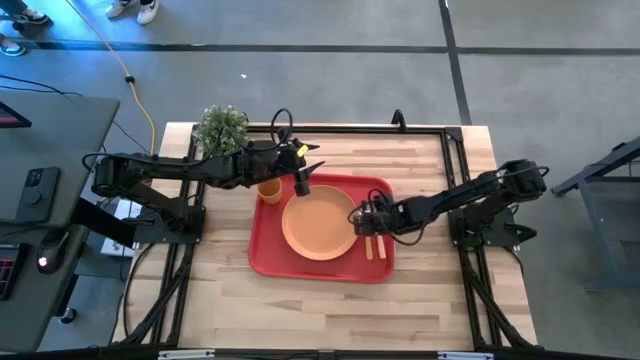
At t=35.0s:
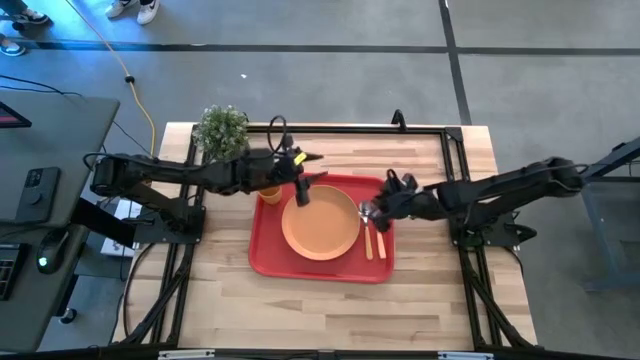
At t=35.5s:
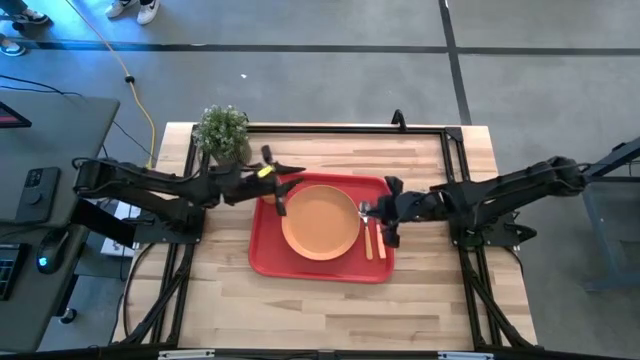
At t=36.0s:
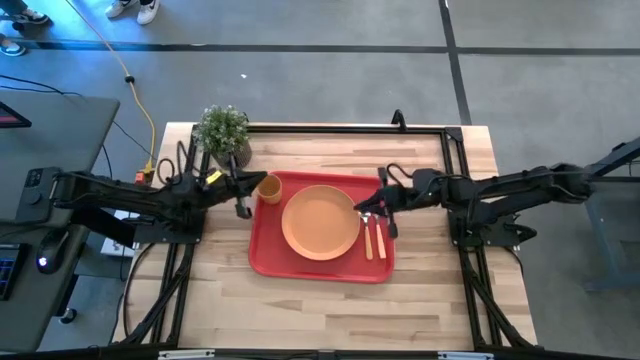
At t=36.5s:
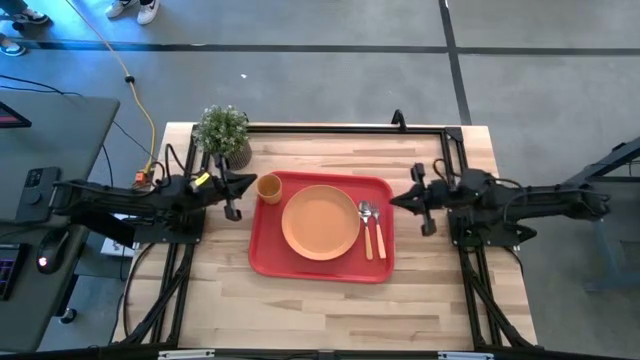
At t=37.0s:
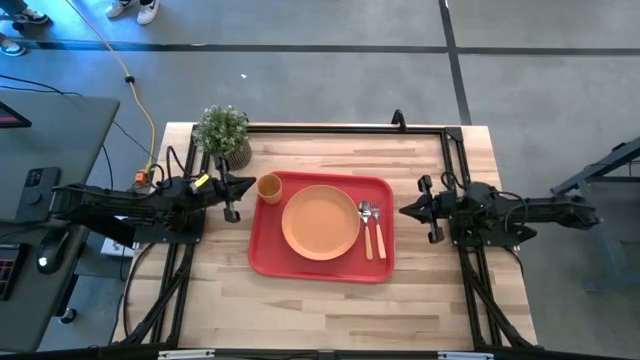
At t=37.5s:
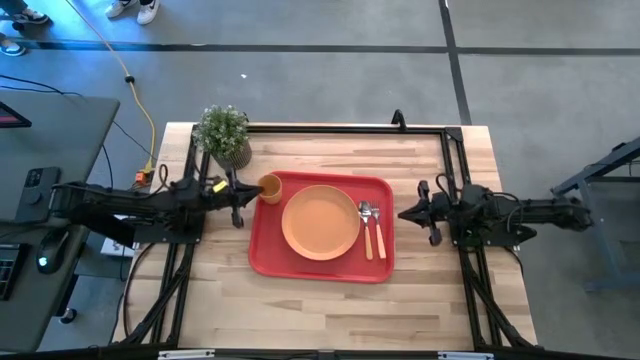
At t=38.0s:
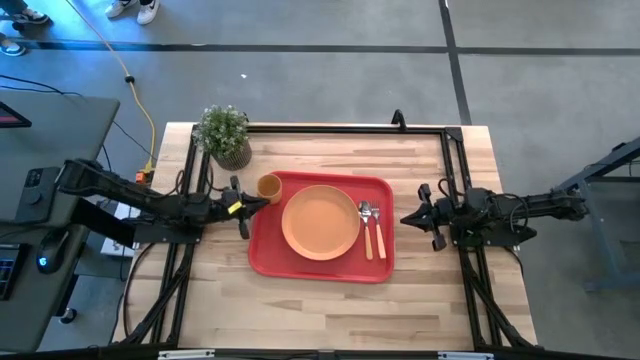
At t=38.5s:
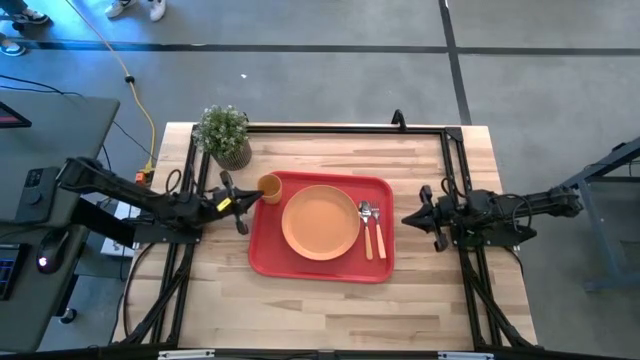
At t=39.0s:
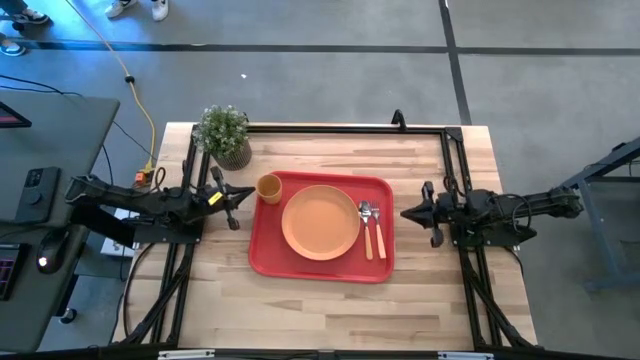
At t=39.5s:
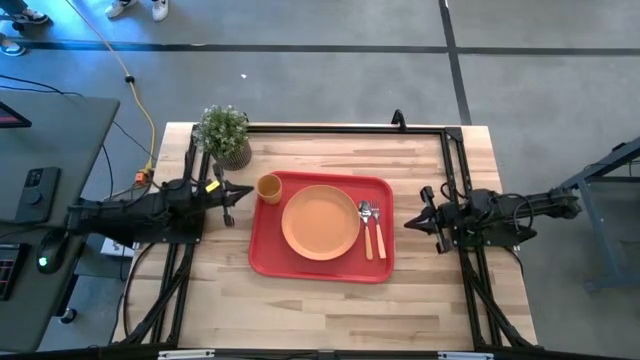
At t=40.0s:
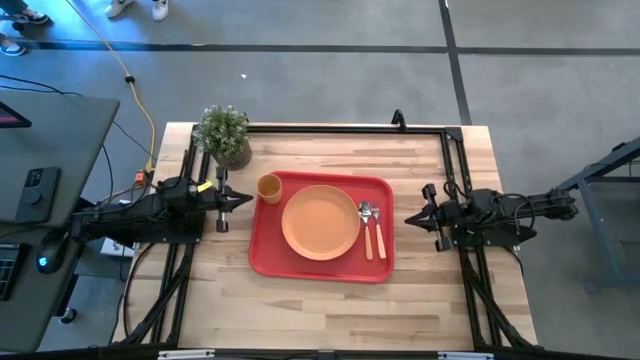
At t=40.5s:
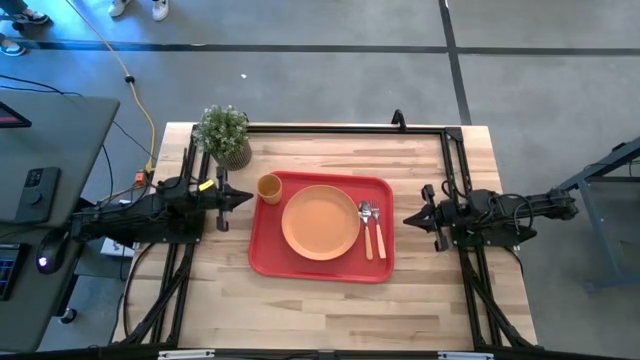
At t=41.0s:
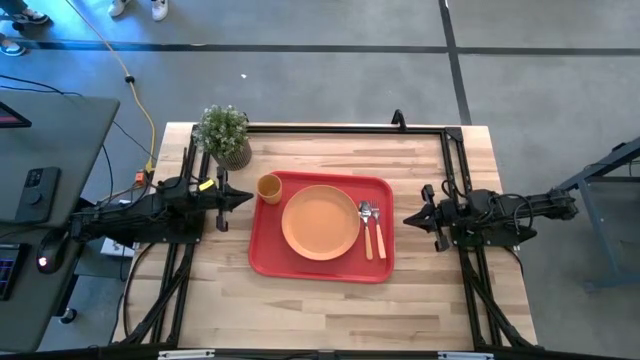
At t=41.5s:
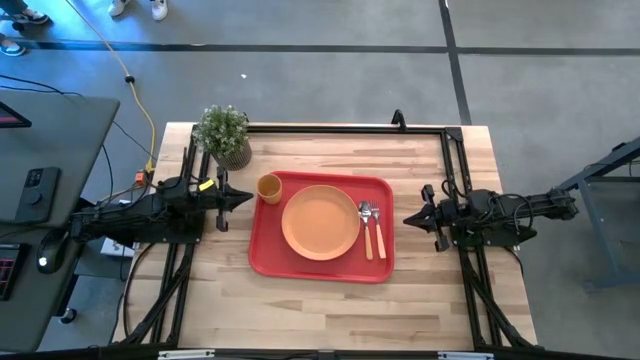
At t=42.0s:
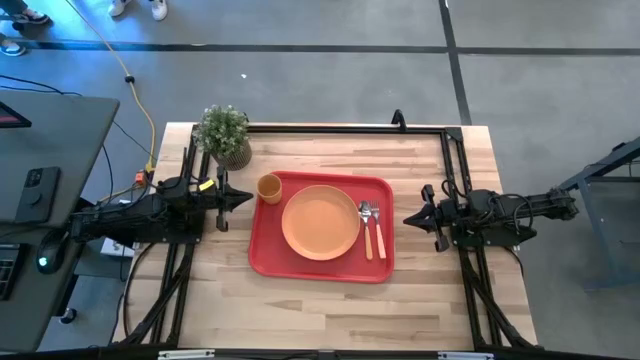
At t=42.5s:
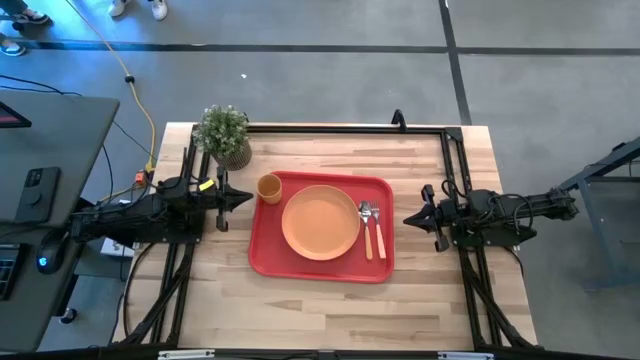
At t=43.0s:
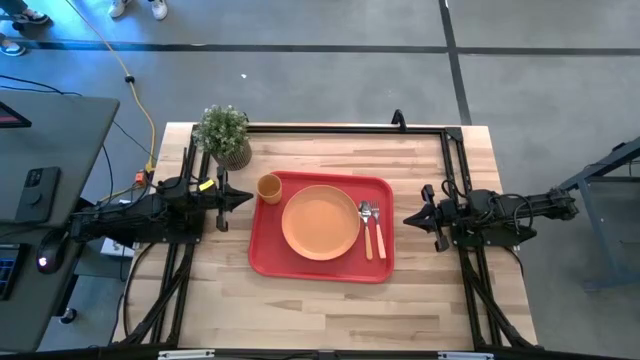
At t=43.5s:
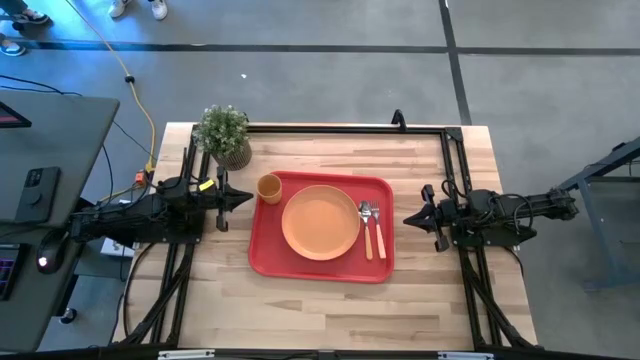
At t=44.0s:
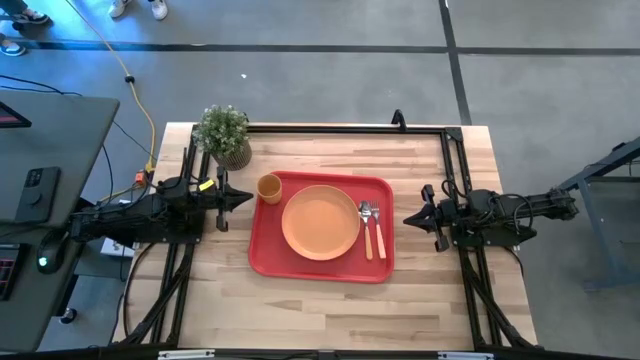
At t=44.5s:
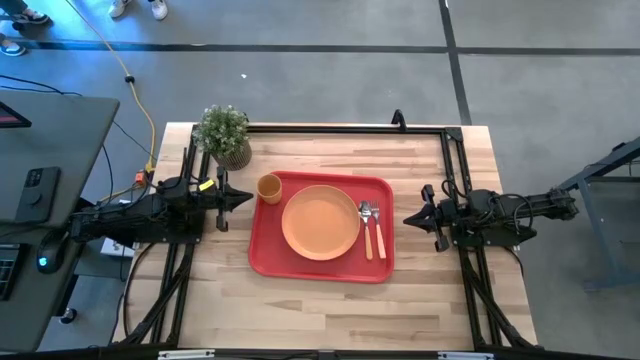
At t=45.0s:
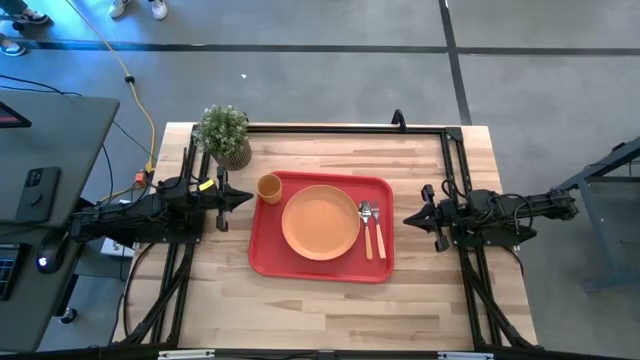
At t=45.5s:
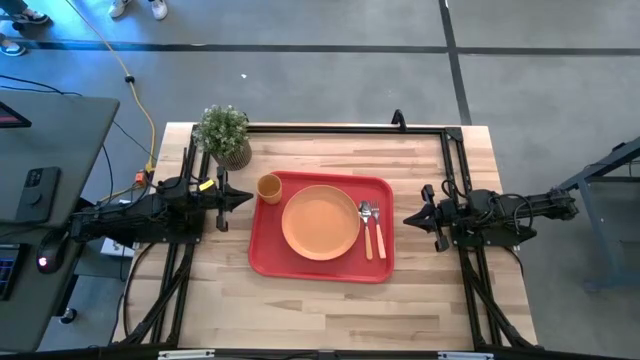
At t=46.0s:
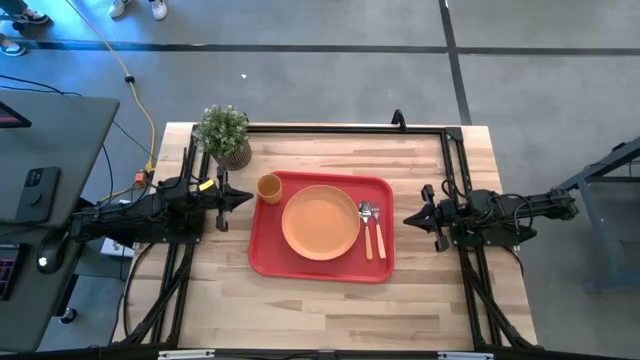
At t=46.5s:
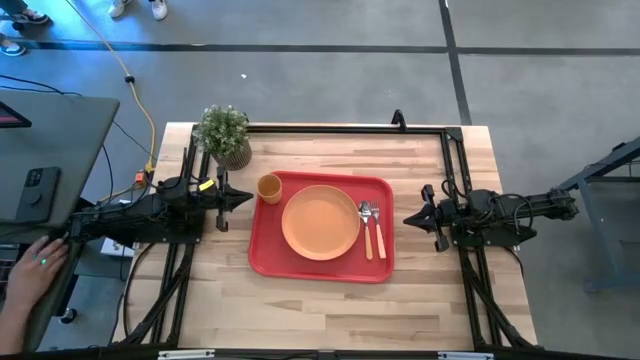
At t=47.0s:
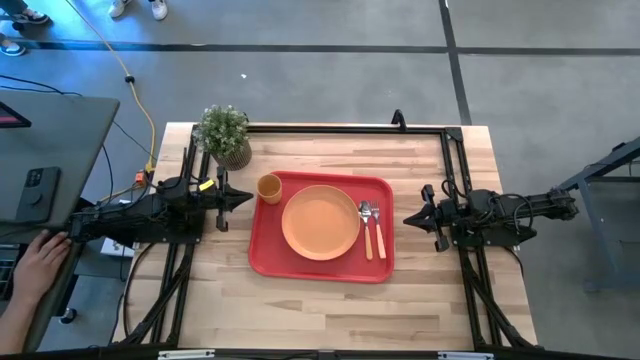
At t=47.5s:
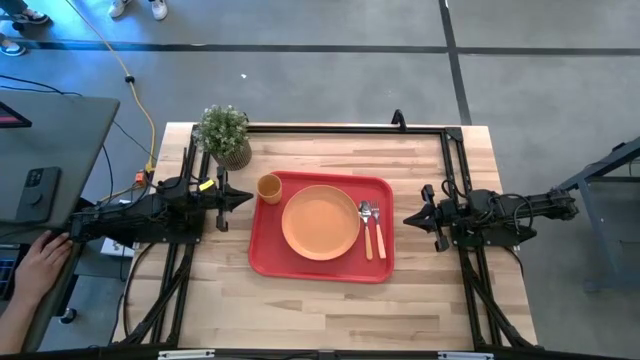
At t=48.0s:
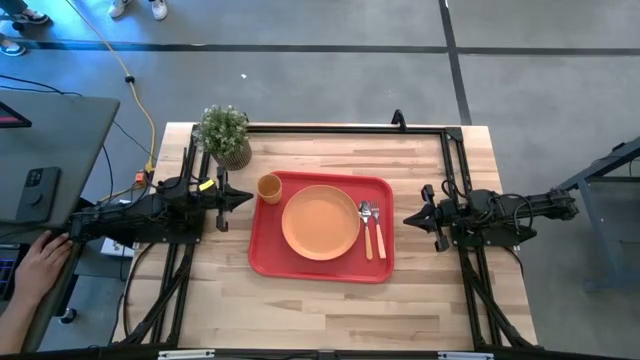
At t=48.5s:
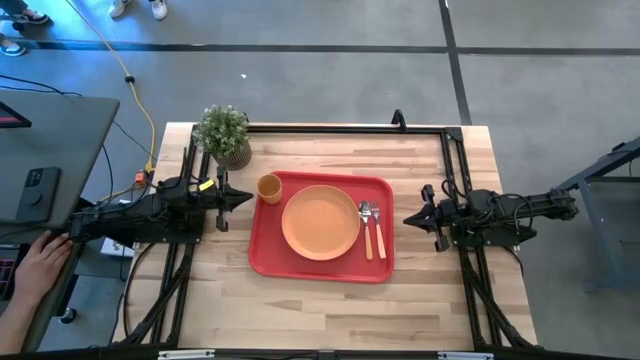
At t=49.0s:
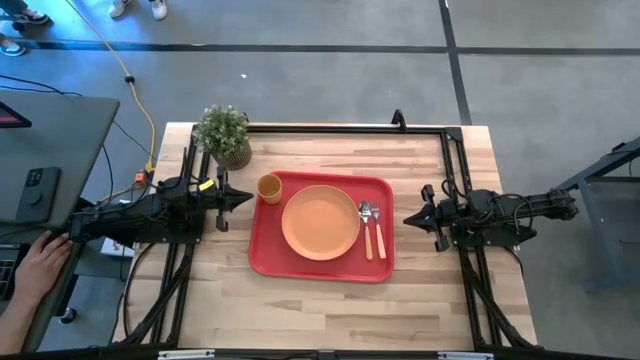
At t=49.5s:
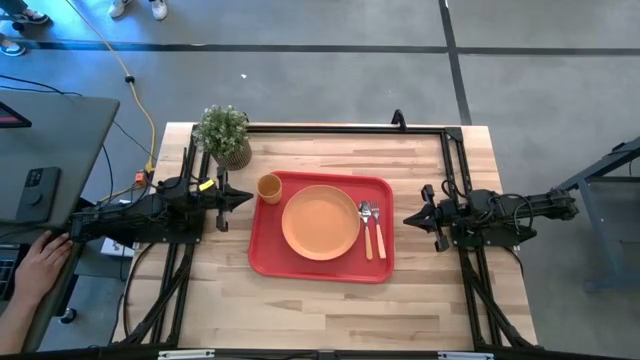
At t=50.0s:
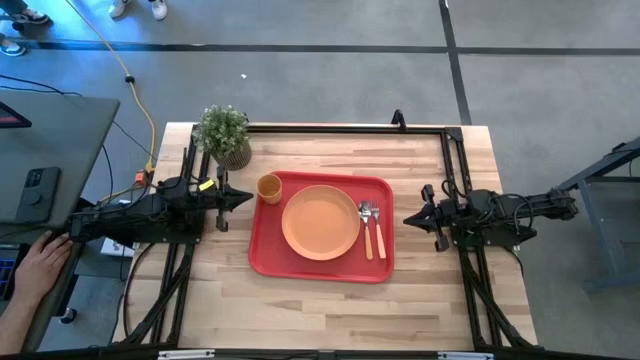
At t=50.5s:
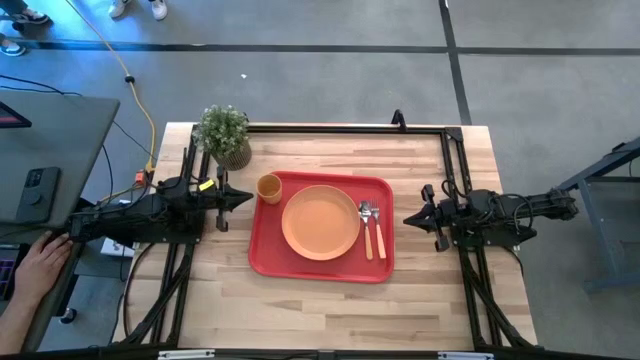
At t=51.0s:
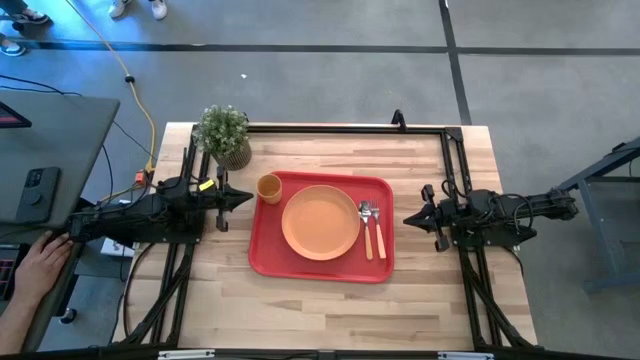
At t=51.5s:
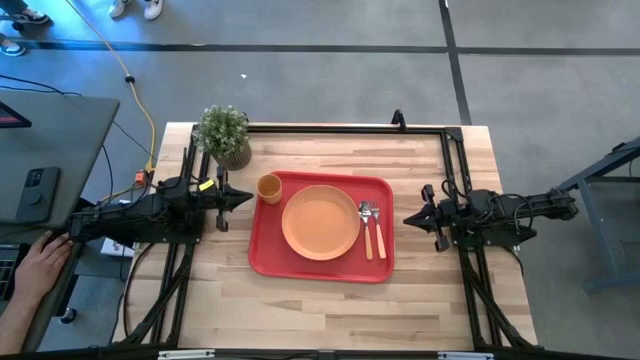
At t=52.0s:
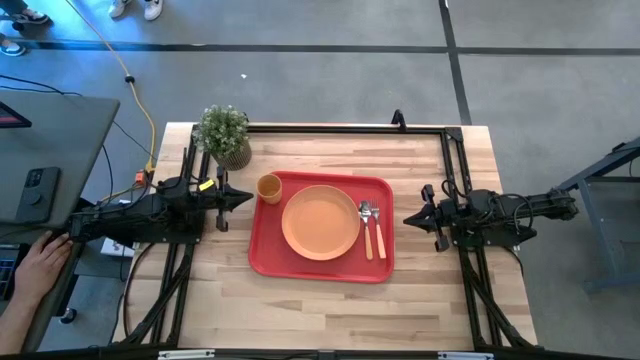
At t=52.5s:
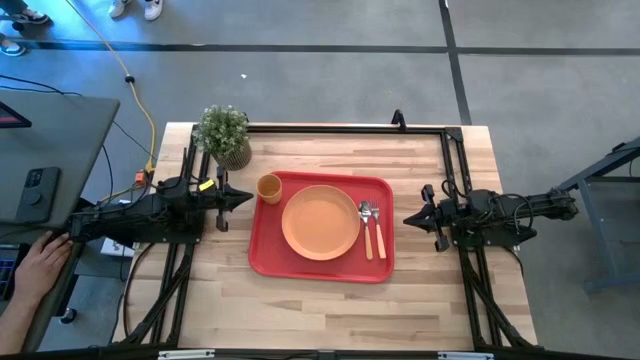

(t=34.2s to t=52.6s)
Task: Pick and place plate/cup/fork/spoon on tray
Return to Home Position

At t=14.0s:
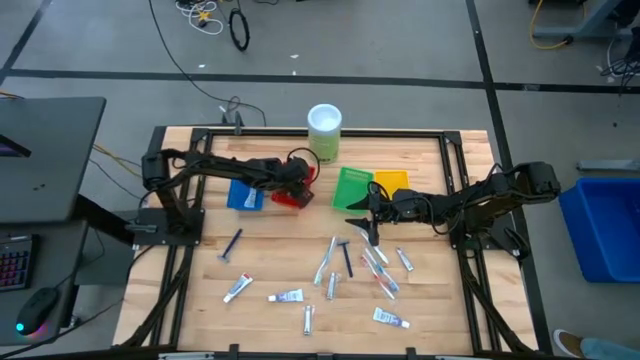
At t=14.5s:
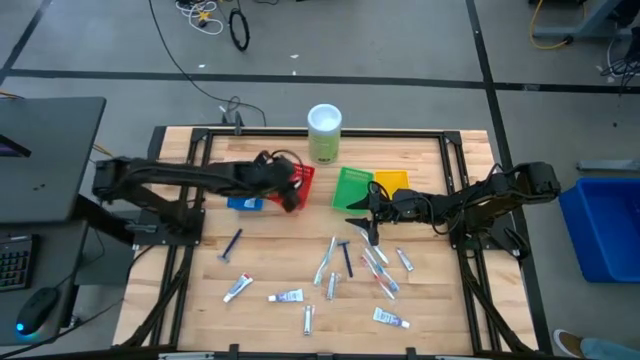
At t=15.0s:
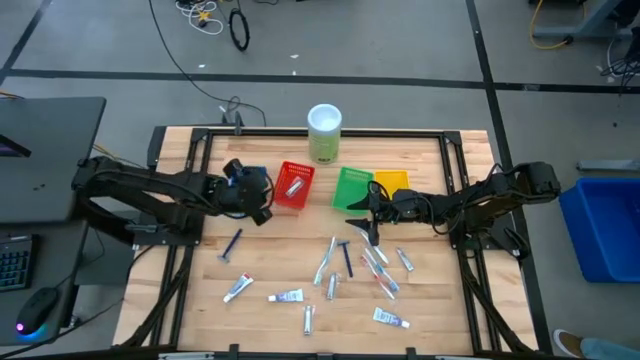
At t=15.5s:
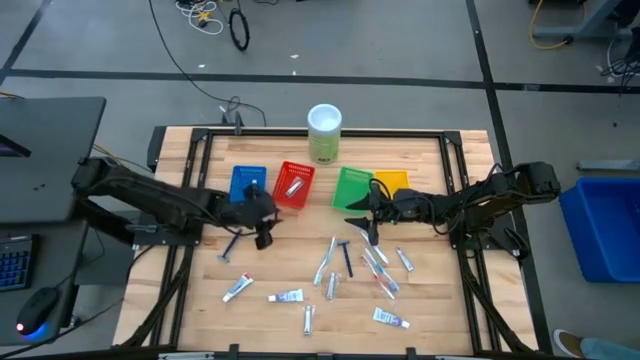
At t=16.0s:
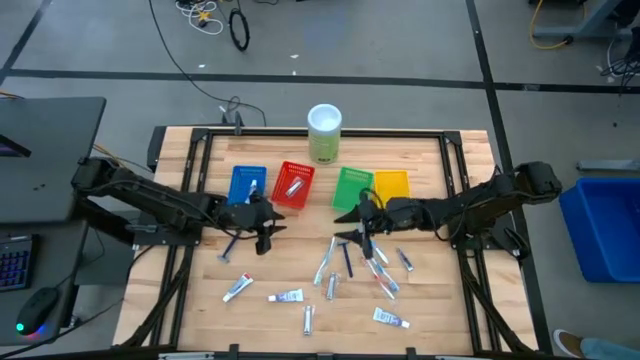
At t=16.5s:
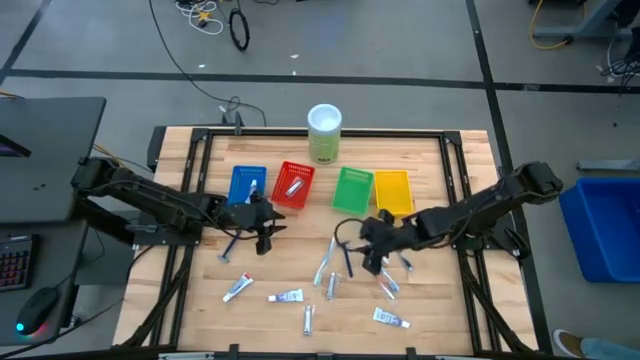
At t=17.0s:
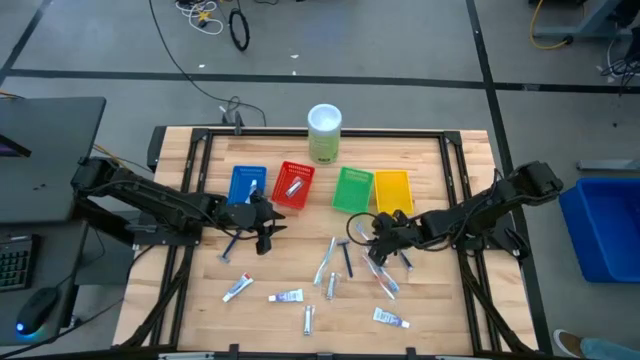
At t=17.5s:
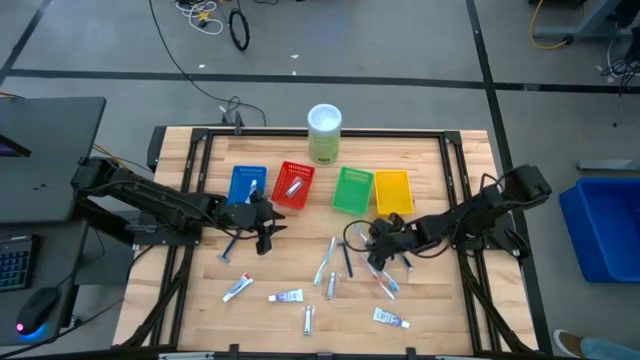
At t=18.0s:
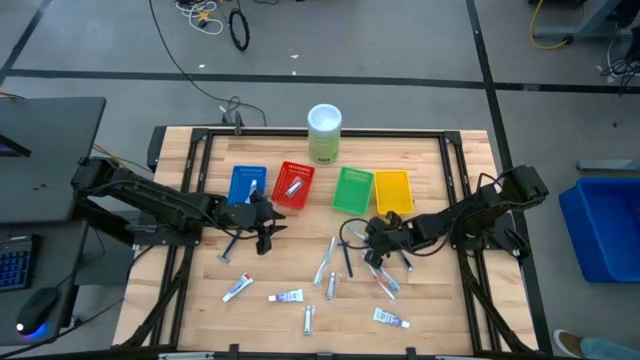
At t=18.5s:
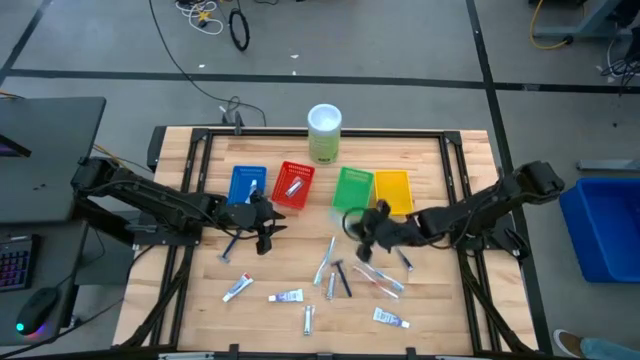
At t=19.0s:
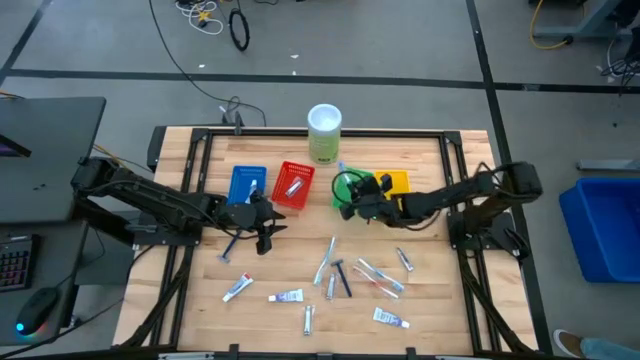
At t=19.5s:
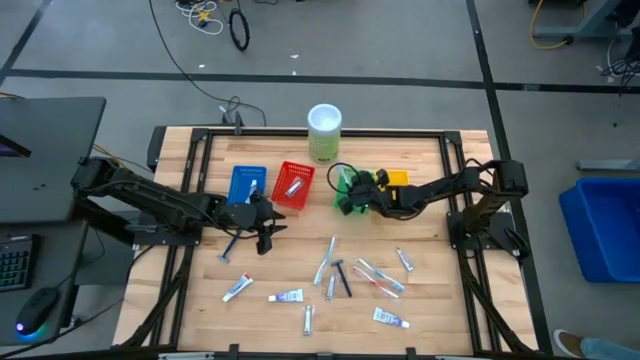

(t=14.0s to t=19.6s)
Task: Pick & Place Travel size toiletries
Put the blue toothbrush into the green basket
